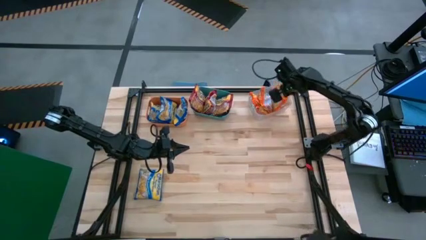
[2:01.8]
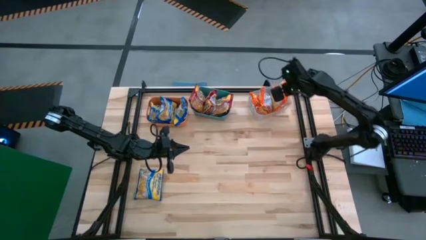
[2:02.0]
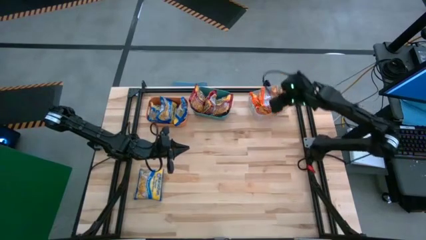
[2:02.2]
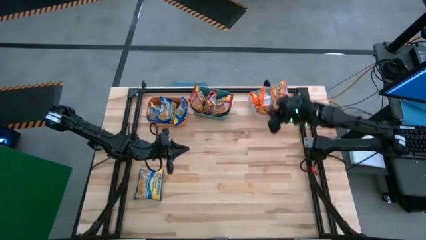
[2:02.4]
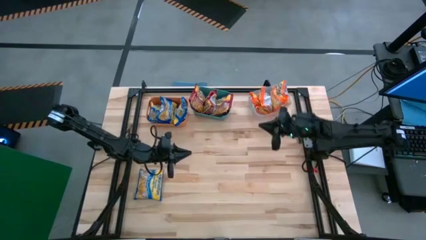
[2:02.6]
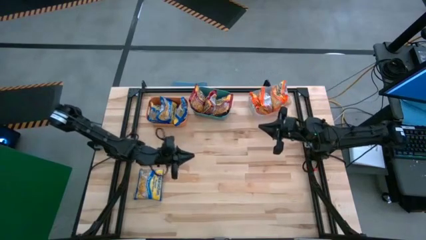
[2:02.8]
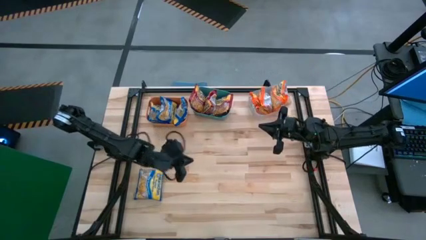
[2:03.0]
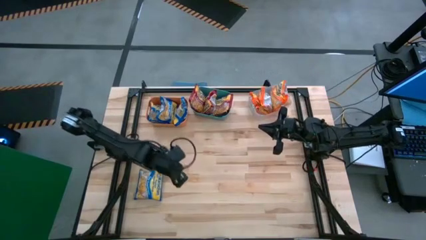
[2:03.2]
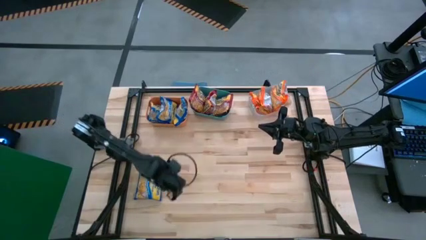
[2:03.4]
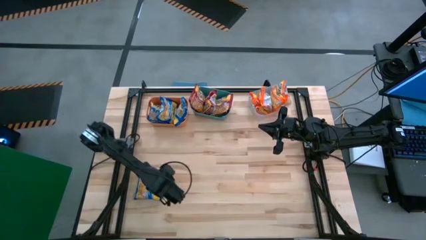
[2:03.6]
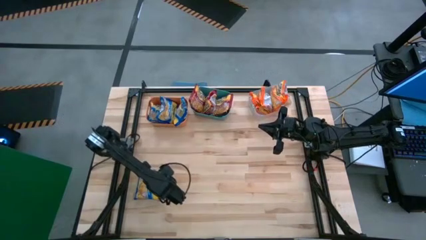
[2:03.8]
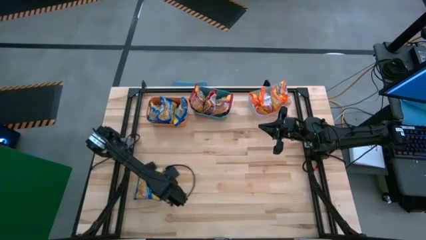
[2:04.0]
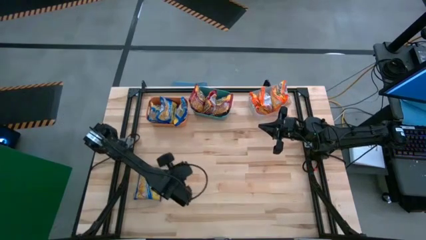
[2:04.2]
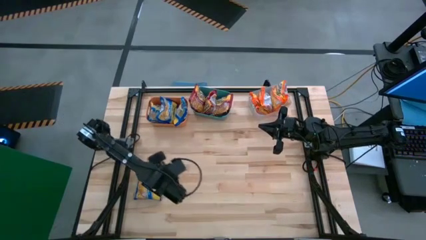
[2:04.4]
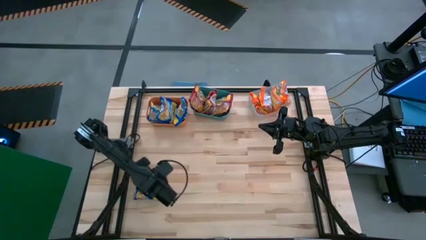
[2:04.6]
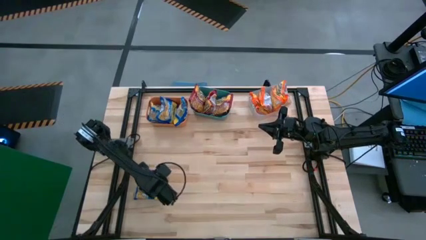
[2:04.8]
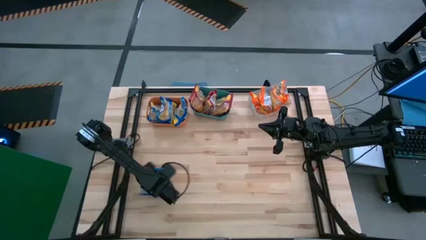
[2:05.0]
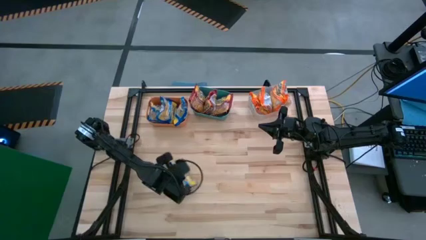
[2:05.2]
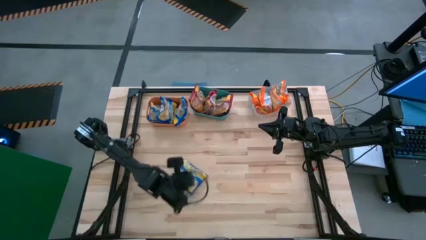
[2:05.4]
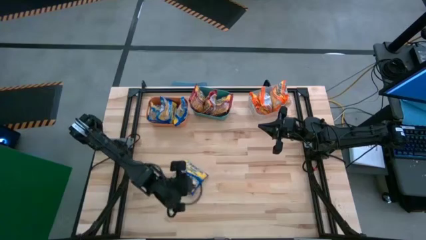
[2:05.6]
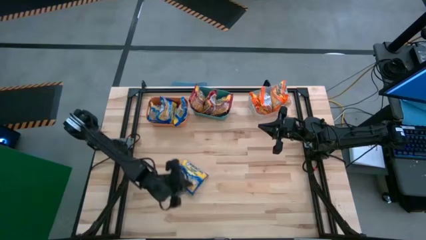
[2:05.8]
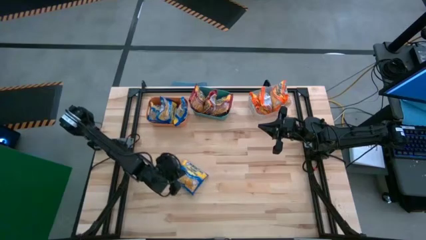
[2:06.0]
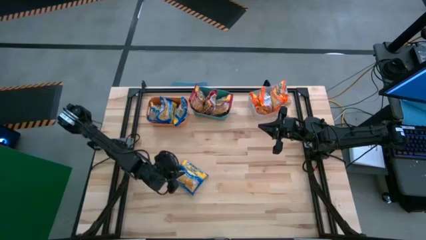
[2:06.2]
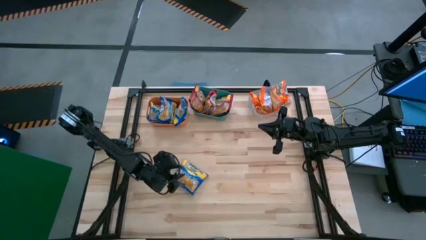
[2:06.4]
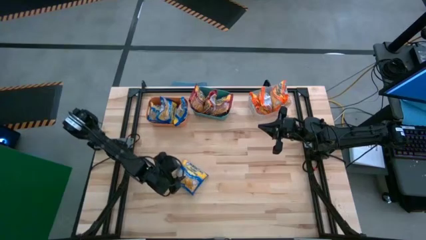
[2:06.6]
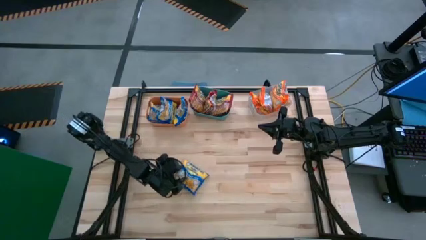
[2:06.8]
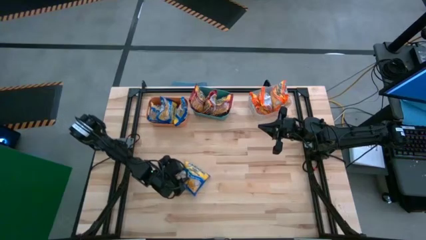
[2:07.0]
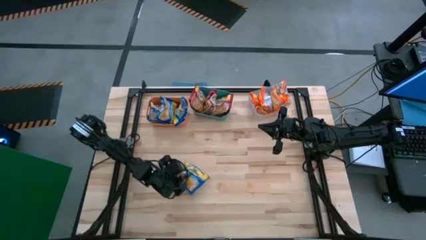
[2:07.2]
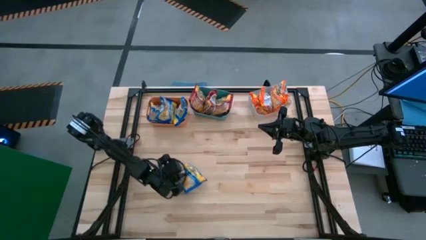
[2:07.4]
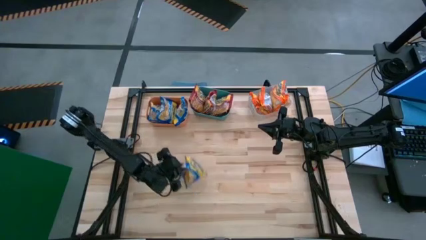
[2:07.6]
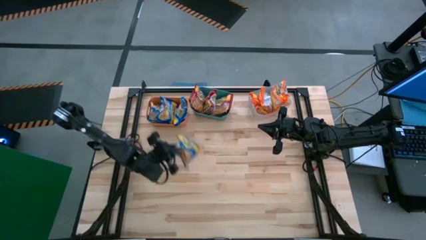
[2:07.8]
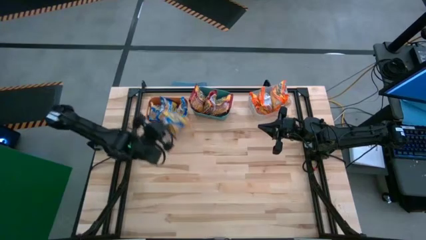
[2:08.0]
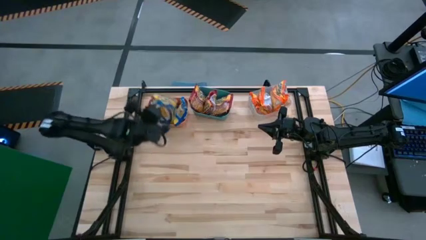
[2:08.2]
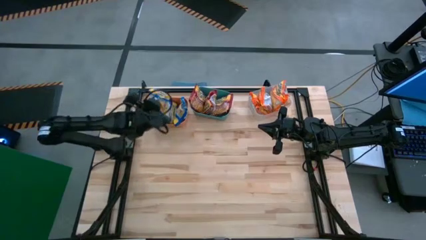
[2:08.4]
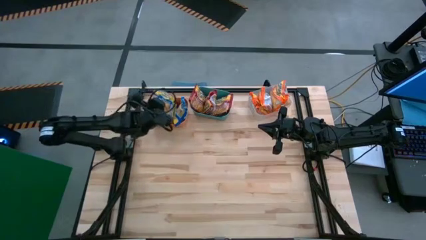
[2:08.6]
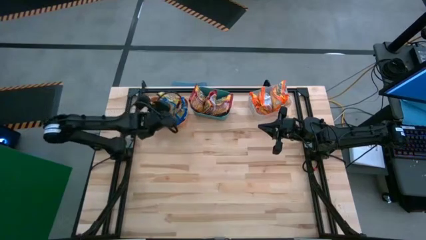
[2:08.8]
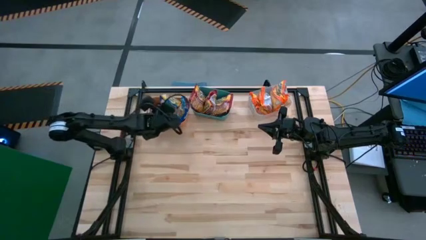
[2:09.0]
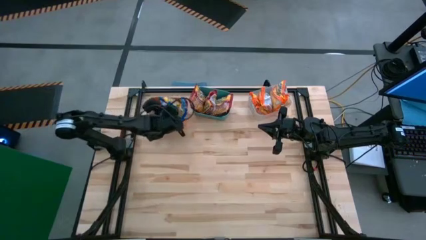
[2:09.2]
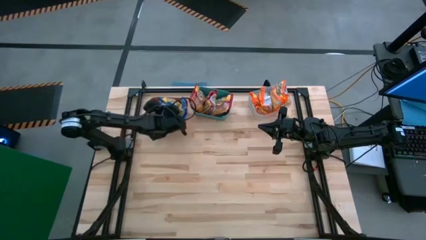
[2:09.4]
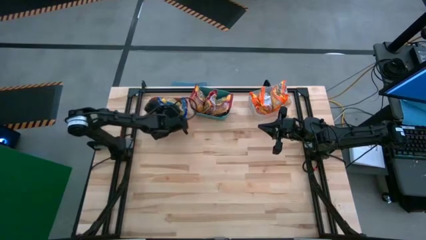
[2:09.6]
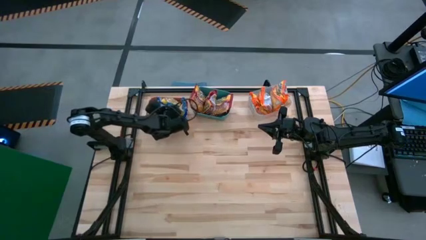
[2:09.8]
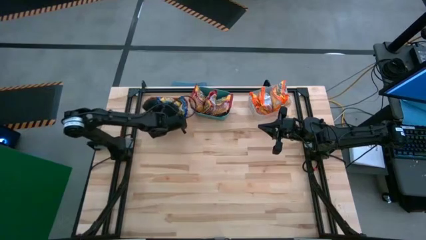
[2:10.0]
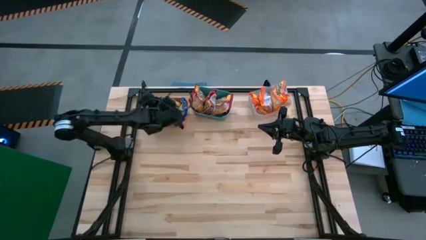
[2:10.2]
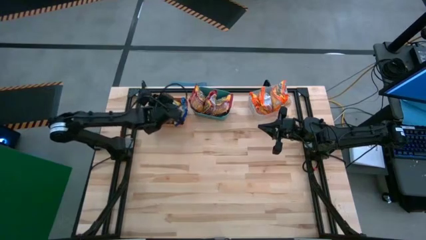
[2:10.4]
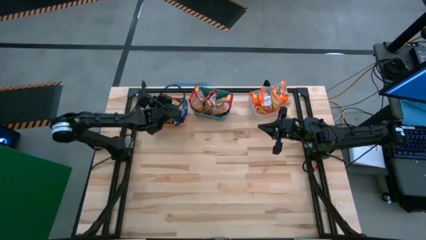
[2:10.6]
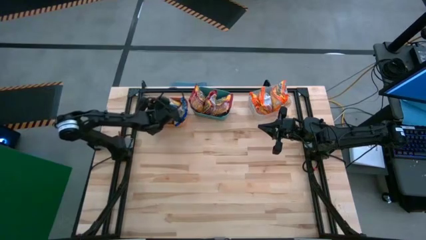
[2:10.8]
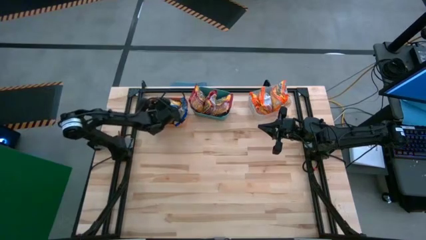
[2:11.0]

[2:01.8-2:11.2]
Task: Sort Maruchan noodles
Put the blue noodle pack into the orange bin

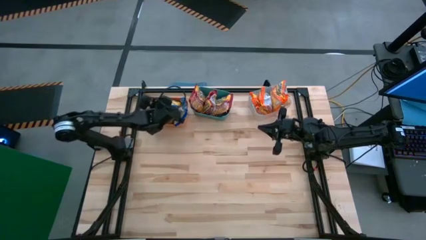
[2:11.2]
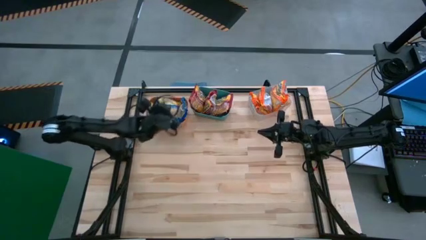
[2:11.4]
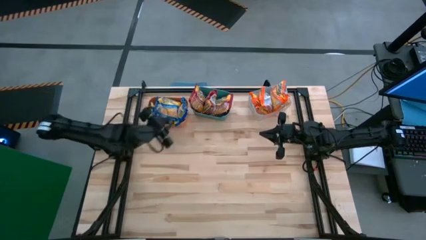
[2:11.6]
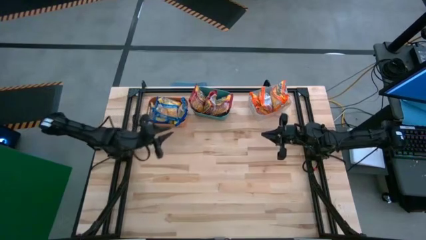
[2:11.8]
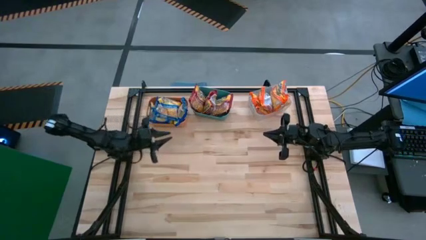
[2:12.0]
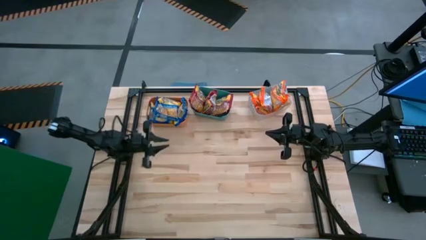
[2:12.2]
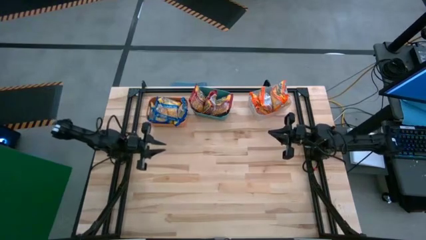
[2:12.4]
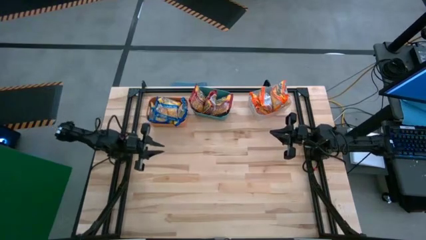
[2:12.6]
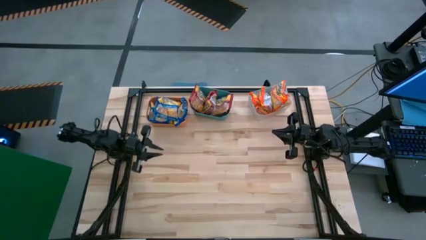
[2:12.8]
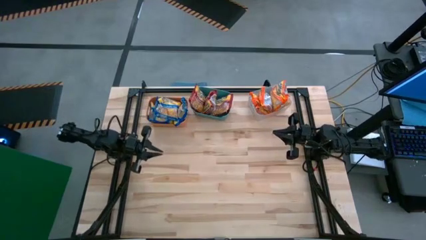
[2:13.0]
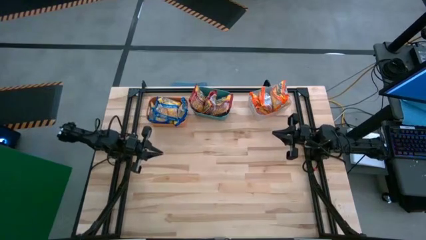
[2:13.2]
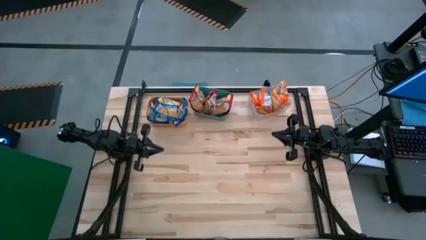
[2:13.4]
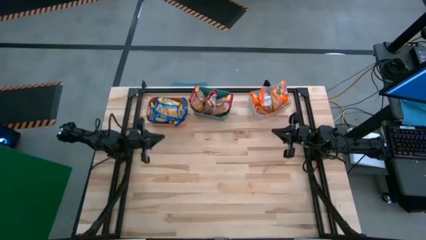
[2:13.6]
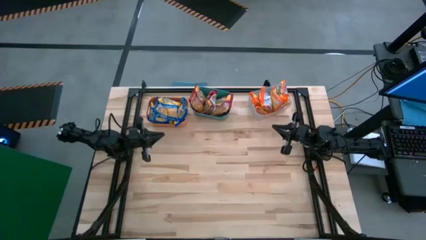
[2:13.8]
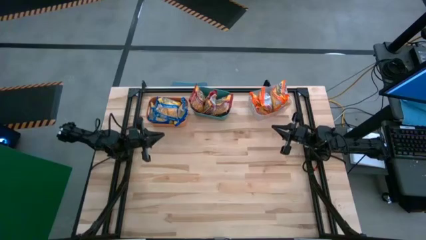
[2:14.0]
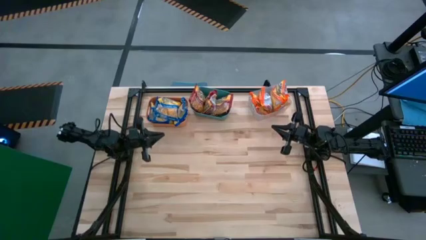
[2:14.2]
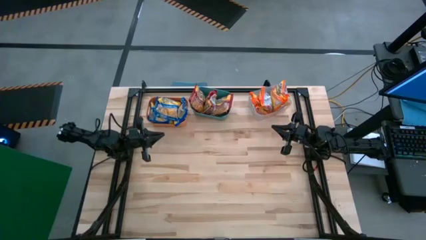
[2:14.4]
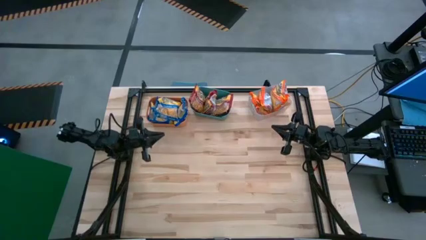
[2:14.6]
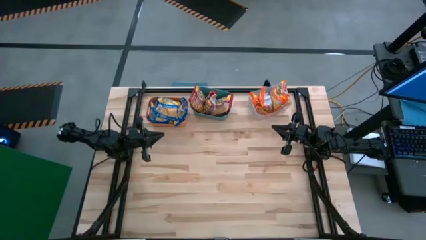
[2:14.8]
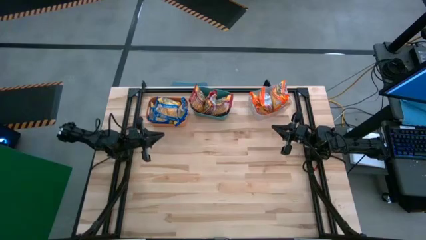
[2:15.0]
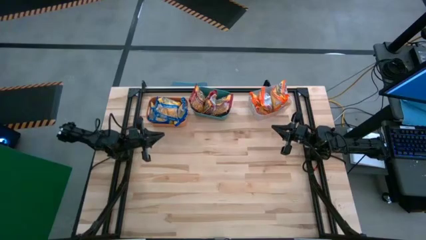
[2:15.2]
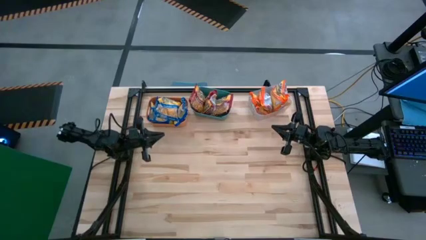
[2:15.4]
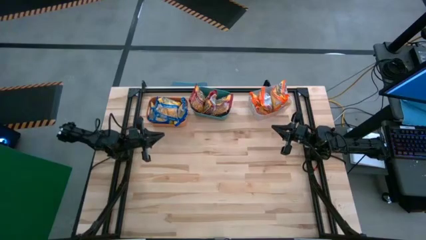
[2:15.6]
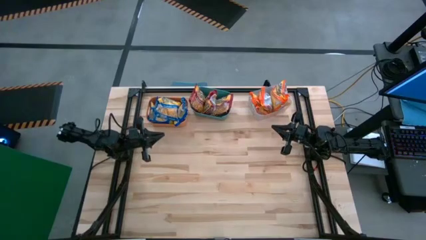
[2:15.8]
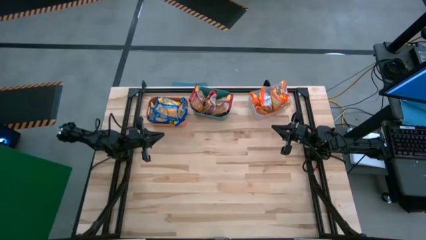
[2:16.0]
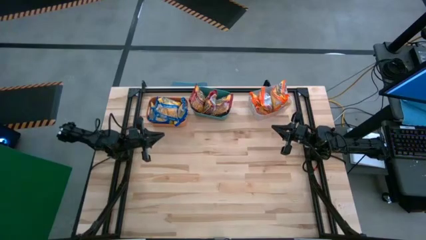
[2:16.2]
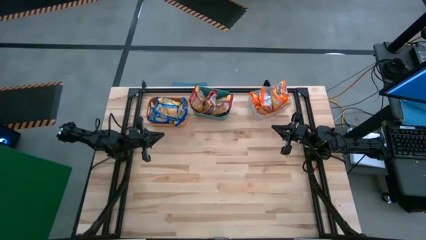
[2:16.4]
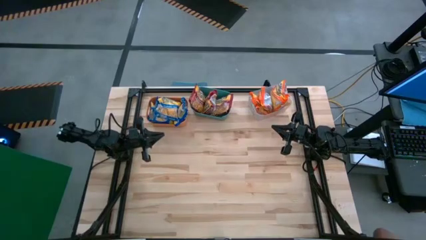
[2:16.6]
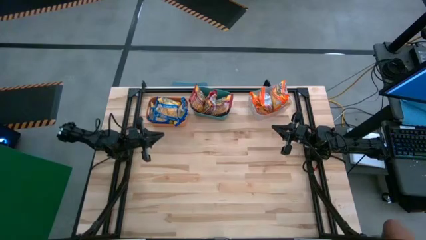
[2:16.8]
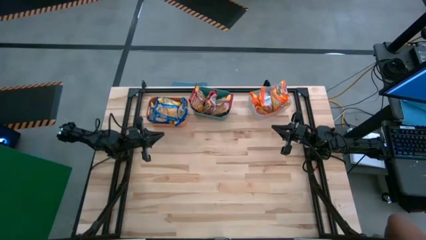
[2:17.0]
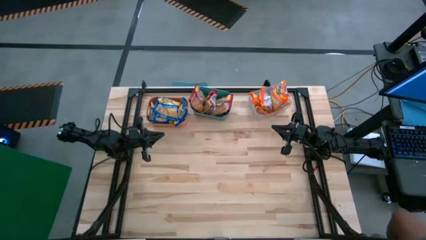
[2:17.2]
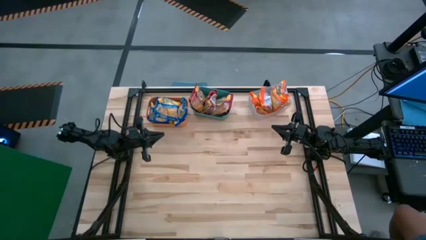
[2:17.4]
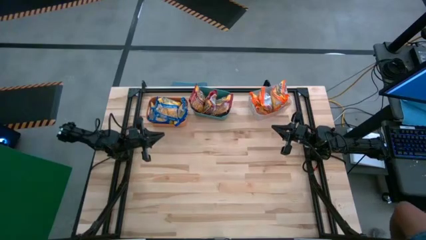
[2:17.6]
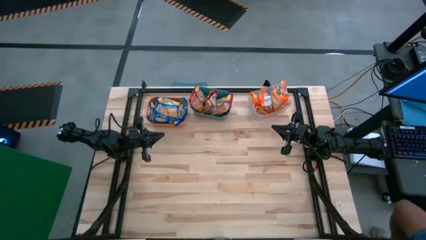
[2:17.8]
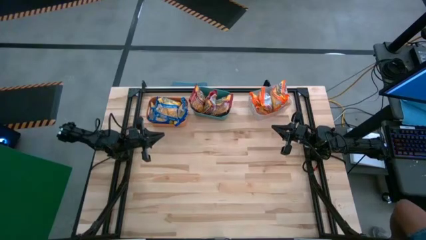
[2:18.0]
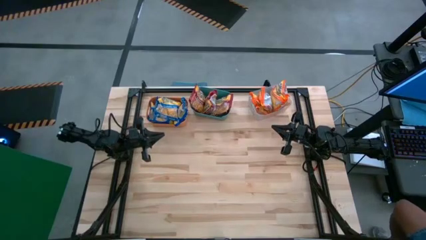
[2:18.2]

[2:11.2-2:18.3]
Return to Home Position
